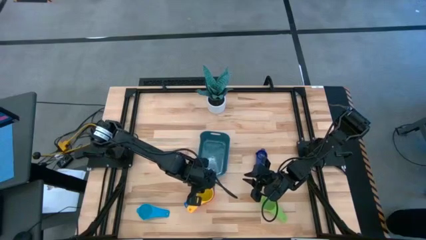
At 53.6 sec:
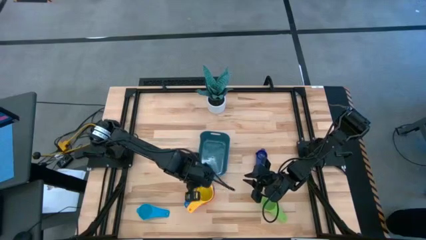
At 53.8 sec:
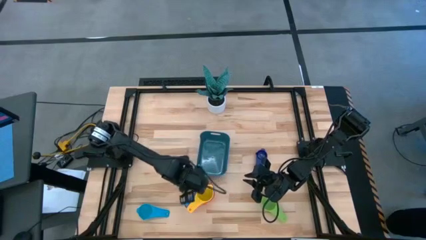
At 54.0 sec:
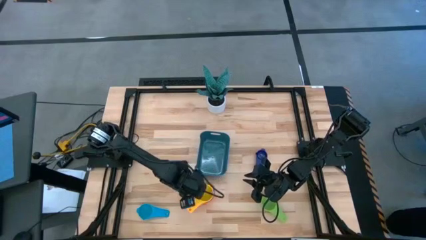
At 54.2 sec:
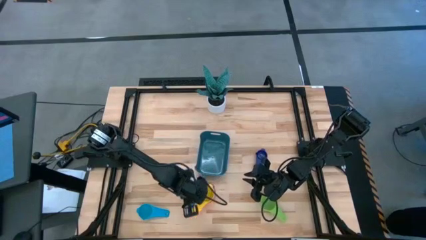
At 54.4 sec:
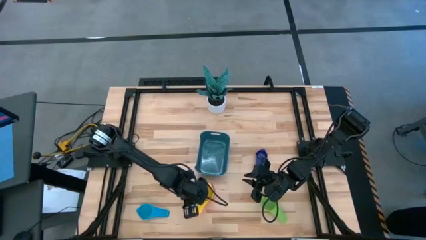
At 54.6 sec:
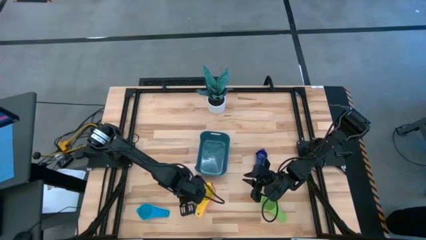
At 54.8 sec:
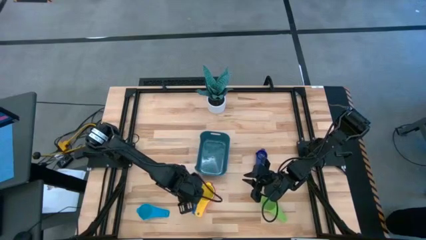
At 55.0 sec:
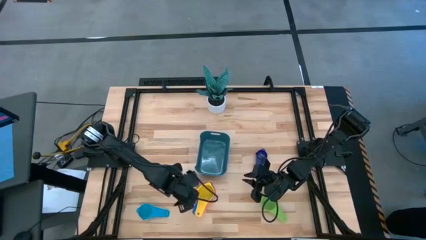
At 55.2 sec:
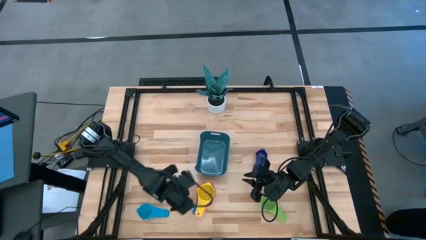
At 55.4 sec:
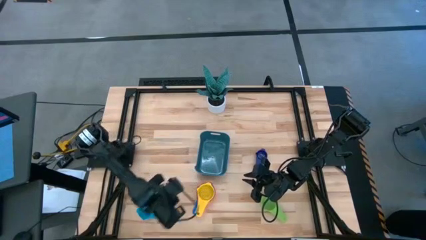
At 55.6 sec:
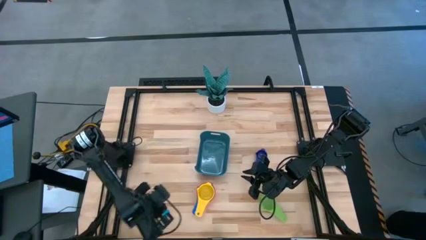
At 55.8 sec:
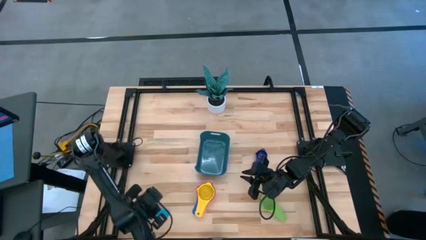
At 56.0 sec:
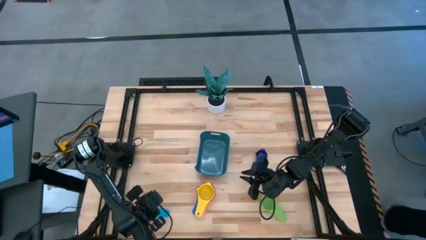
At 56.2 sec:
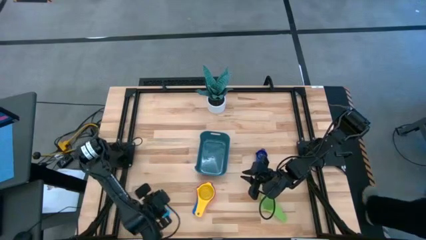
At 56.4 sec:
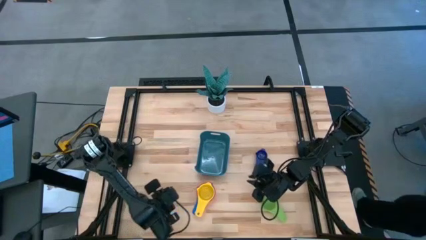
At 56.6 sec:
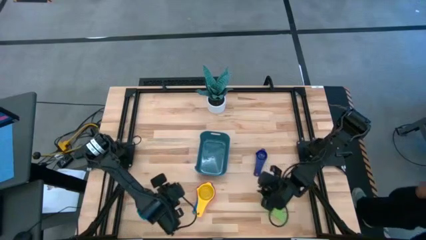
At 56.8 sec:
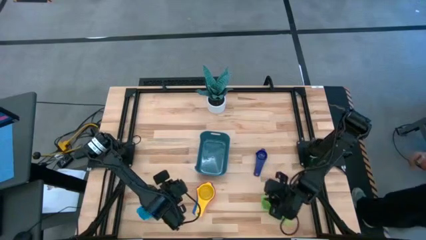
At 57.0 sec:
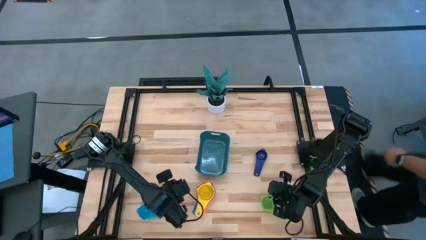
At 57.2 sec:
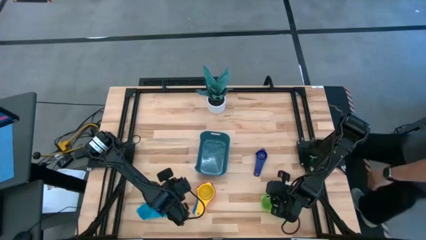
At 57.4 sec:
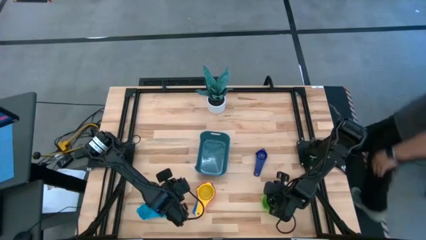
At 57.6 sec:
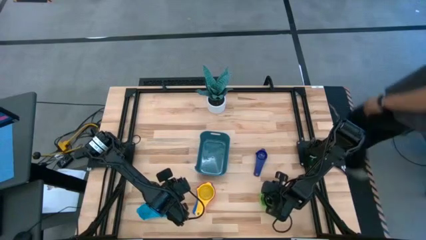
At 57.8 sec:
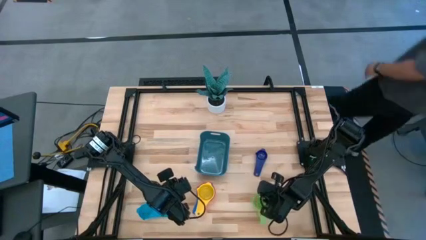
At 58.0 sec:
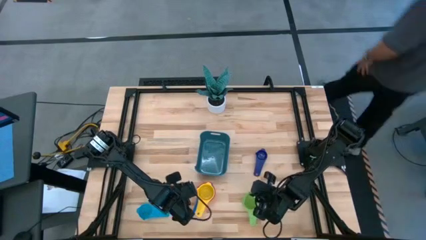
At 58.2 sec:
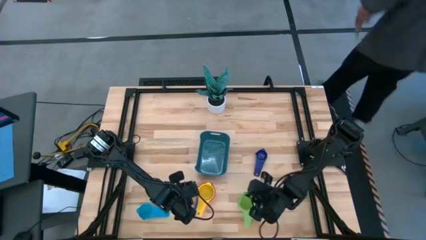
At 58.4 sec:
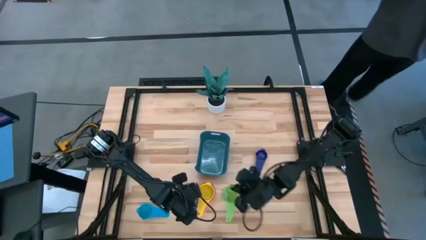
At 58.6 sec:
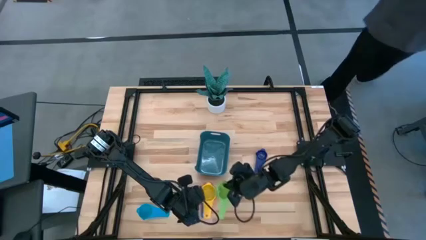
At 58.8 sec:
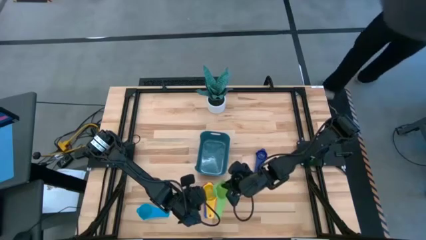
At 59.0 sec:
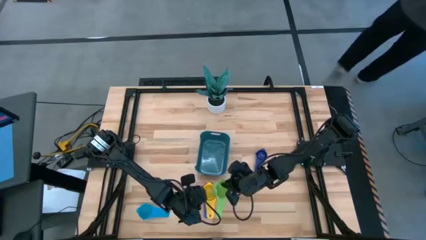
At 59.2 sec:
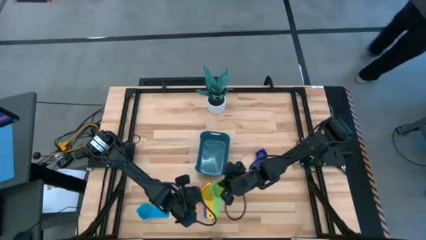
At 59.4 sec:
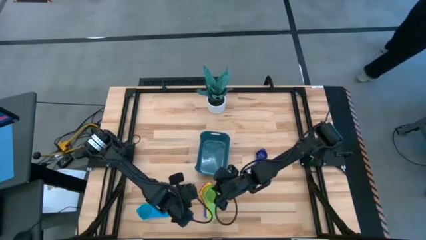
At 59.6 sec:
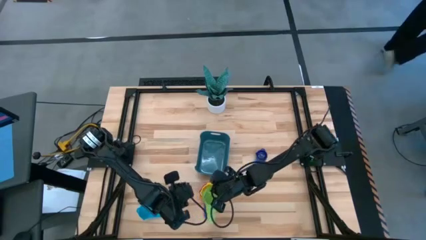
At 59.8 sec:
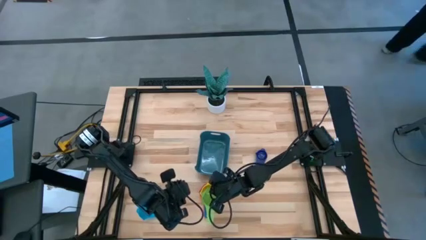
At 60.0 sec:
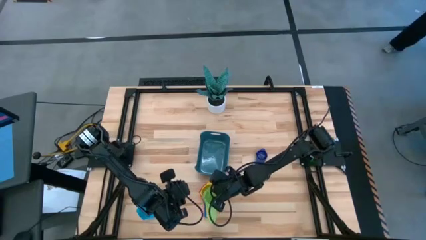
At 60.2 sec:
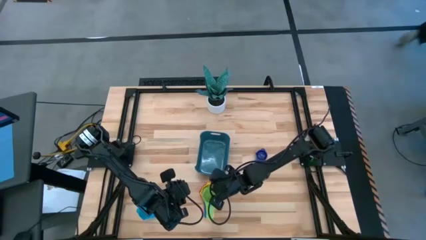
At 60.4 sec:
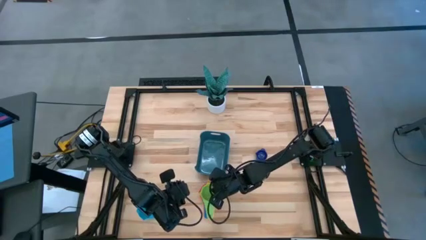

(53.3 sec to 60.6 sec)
Task: Nest measuring cups in basket
Stack the green measuring cup on top of the yellow measuring cup

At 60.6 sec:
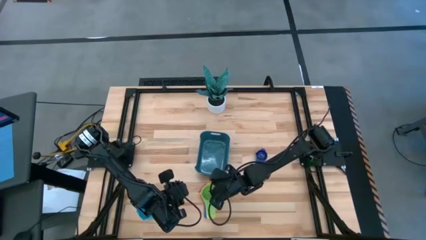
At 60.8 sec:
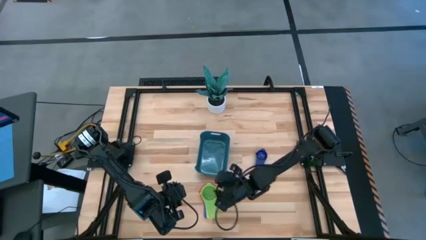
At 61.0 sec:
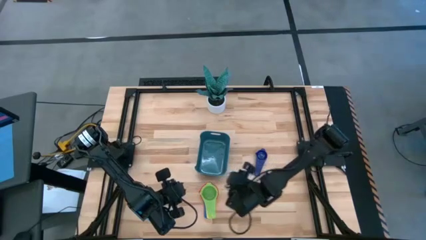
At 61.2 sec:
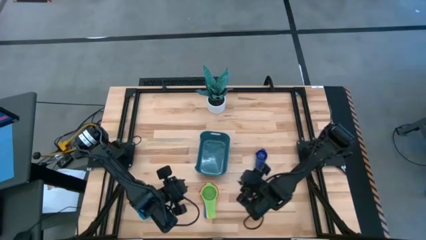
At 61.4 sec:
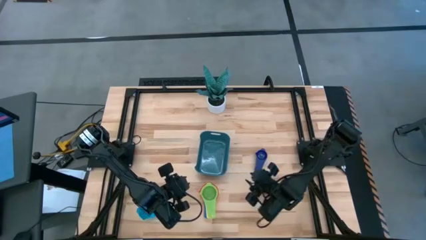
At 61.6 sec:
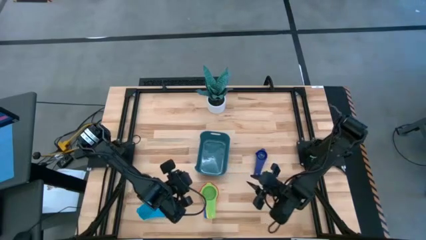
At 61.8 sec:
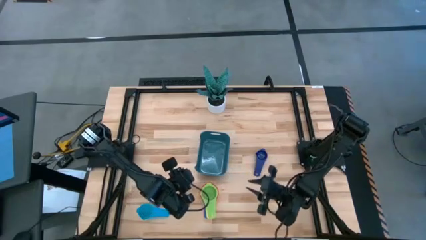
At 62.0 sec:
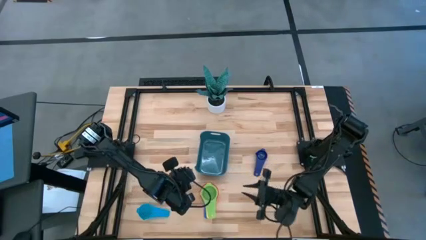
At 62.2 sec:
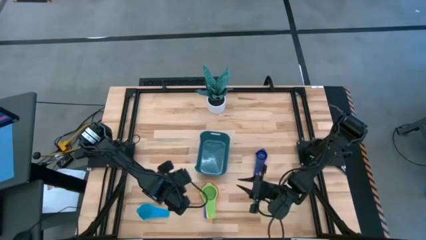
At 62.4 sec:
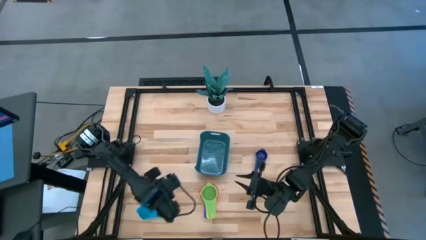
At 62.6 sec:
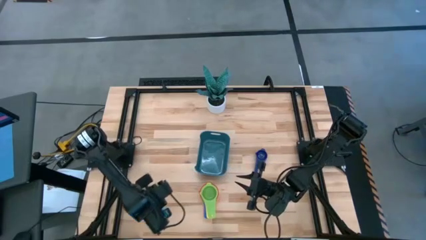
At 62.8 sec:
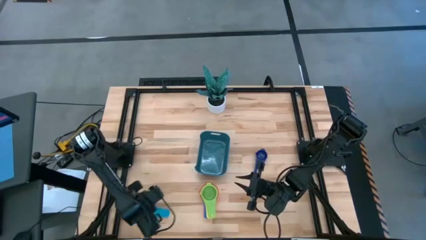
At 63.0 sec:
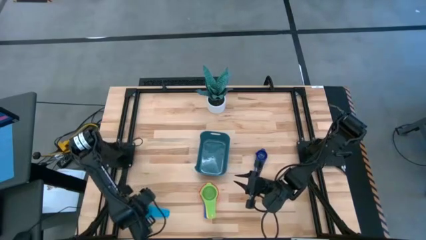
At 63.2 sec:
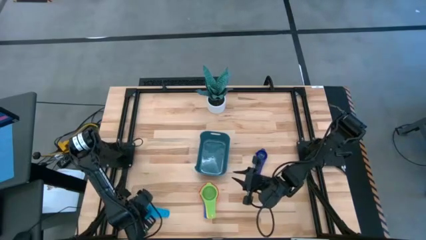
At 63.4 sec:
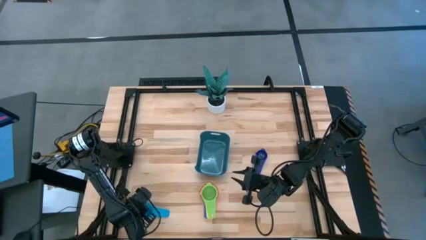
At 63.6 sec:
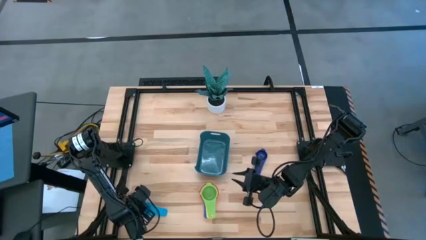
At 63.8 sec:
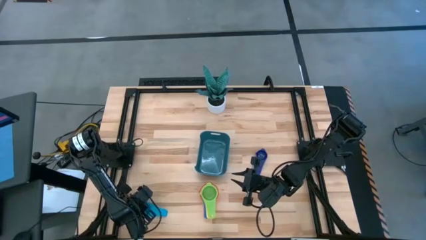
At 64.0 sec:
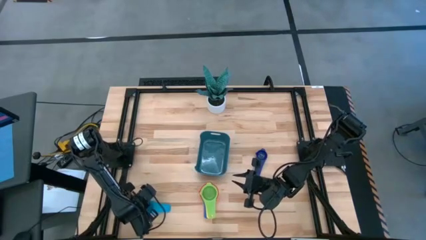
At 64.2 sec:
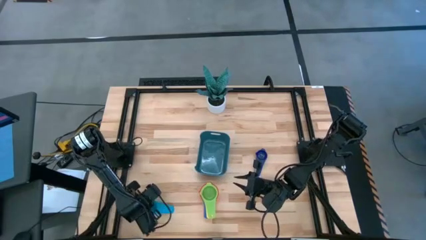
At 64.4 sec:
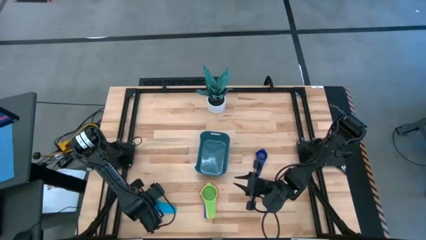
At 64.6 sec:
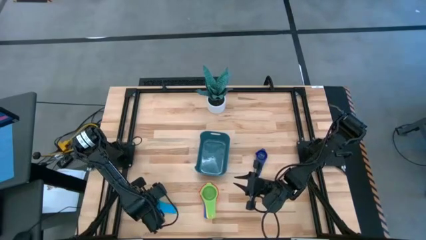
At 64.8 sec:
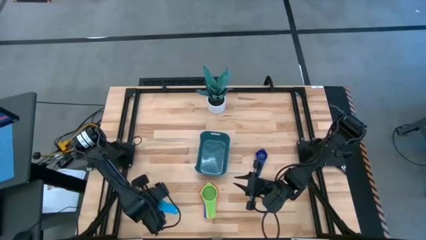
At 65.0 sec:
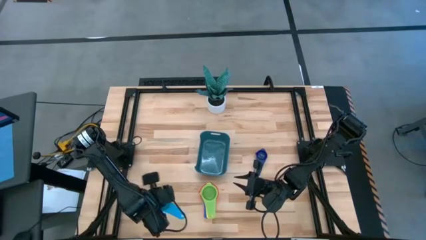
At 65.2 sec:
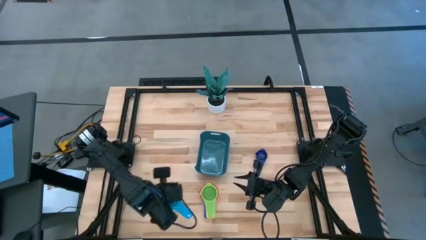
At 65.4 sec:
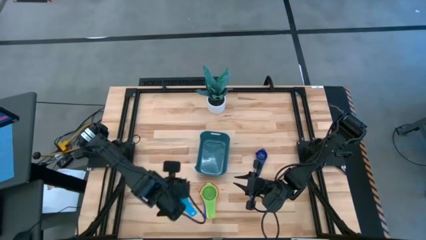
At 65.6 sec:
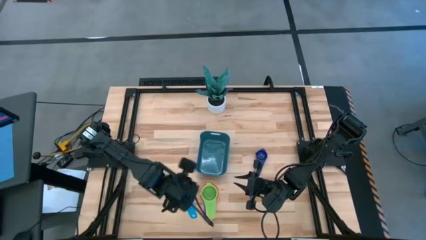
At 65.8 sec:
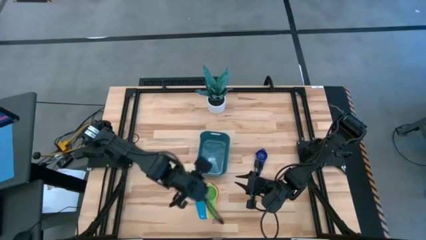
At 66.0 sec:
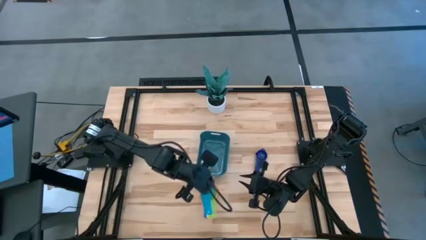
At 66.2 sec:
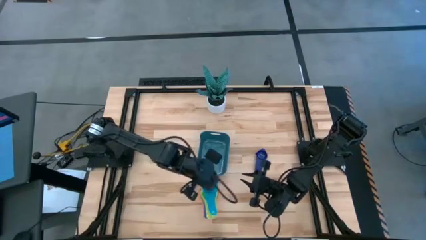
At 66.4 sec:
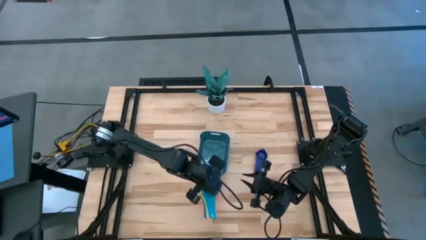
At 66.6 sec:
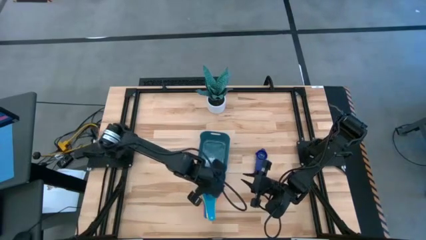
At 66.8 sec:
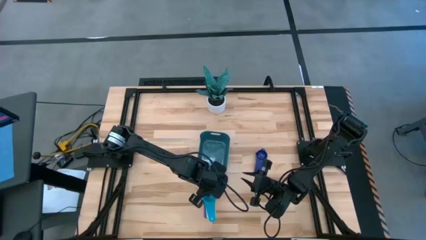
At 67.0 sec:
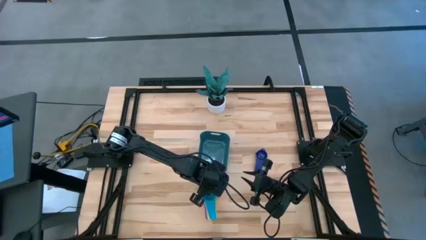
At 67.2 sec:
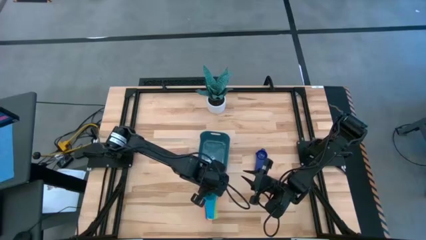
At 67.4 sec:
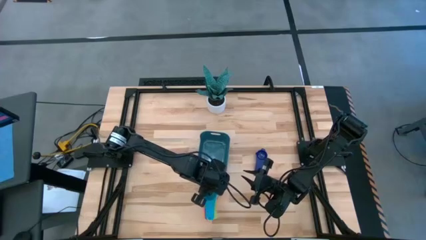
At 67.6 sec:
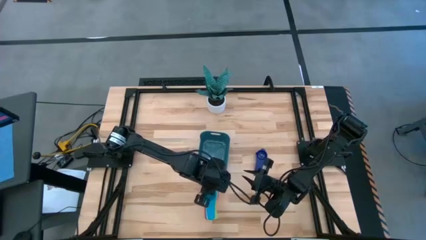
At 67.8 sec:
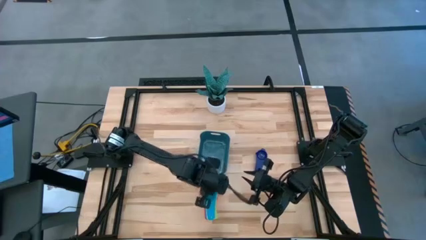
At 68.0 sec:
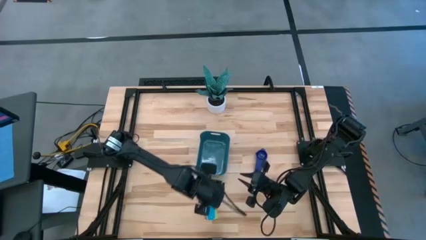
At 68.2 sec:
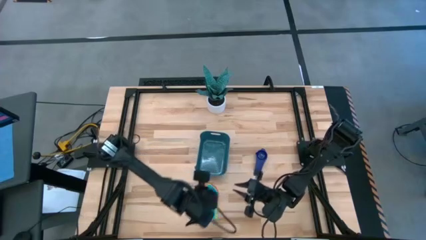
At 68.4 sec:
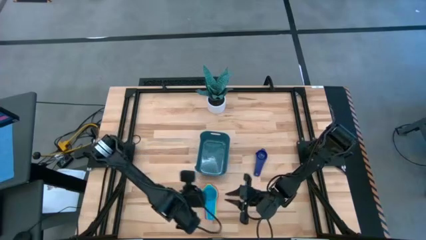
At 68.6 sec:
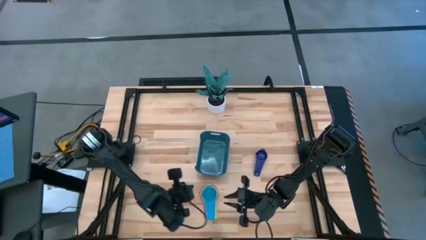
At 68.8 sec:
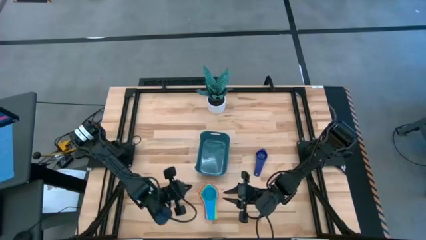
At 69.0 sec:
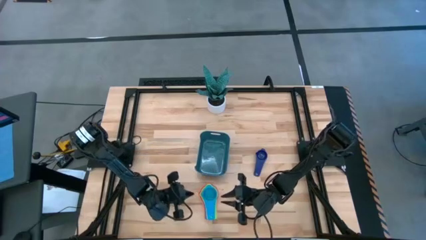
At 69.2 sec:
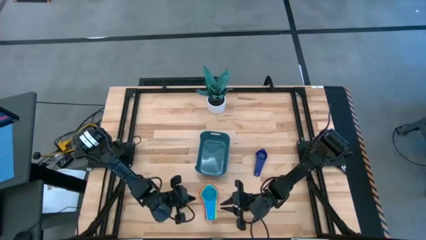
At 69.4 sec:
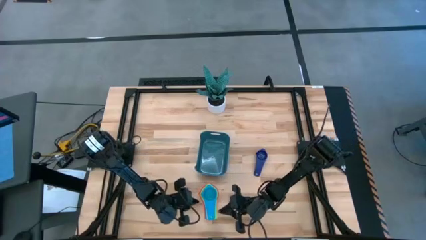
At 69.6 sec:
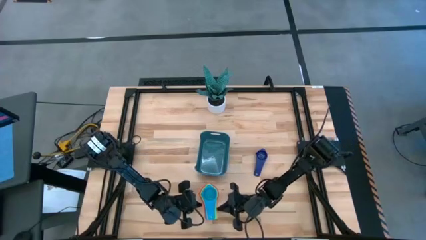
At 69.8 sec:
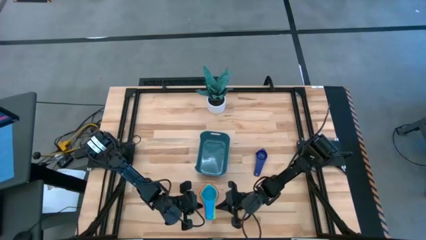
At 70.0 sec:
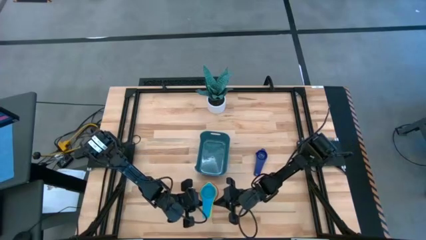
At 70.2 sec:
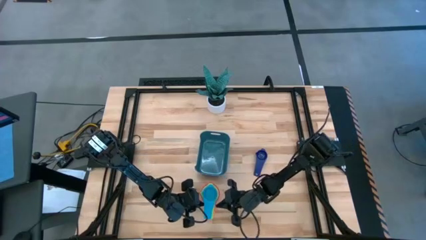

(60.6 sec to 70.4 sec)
Stack the light blue measuring cup on top of the green measuring cup
